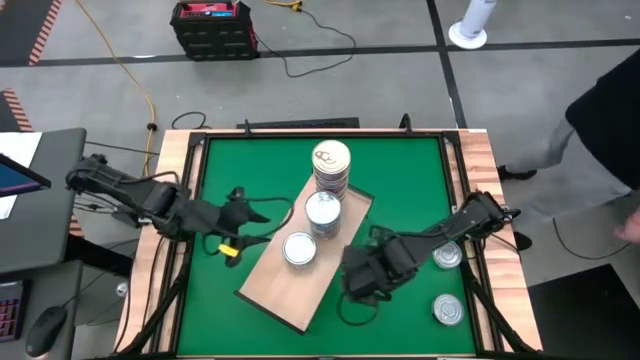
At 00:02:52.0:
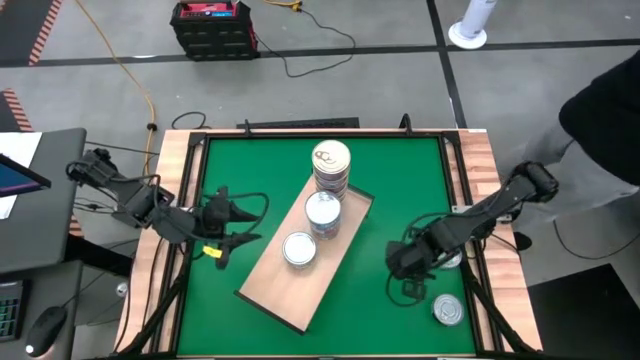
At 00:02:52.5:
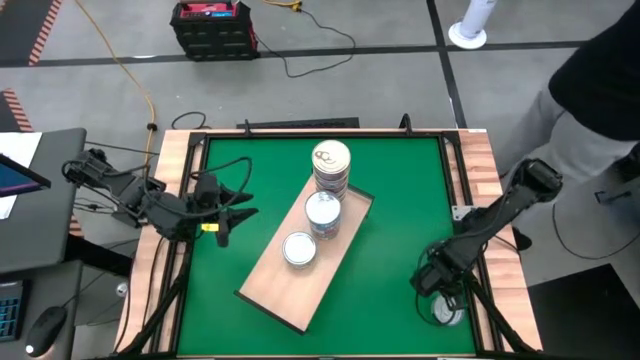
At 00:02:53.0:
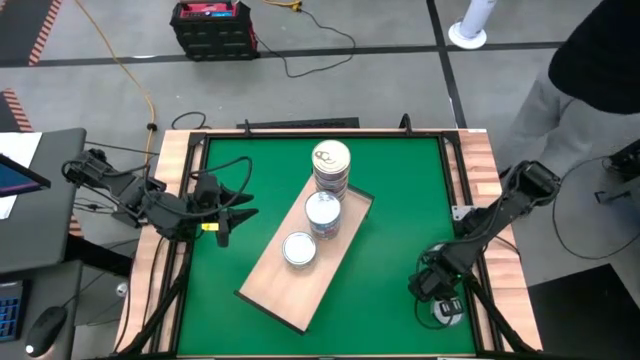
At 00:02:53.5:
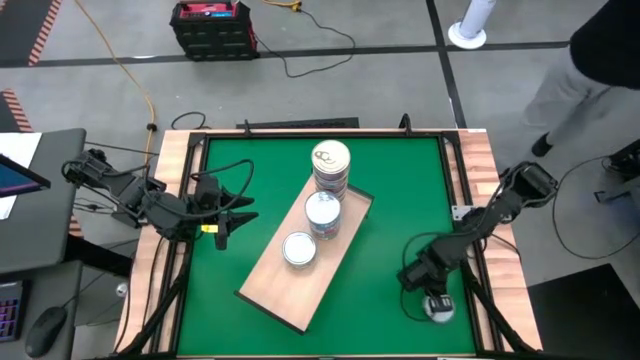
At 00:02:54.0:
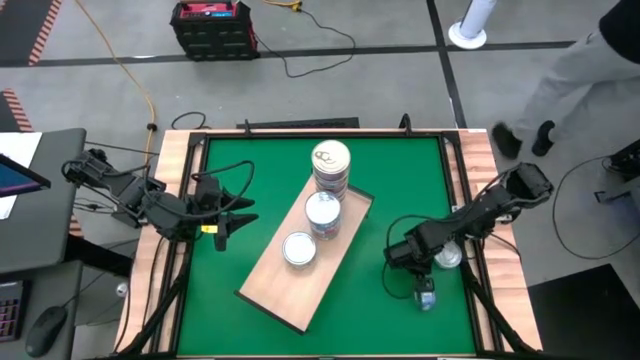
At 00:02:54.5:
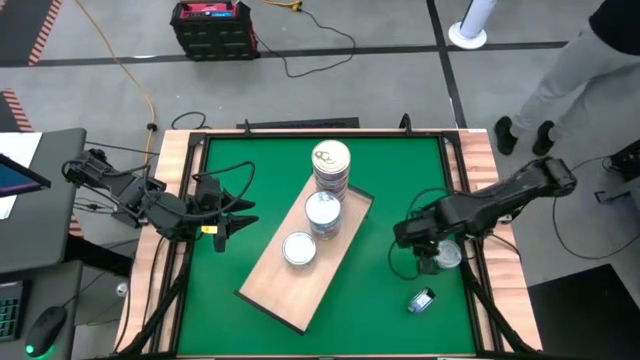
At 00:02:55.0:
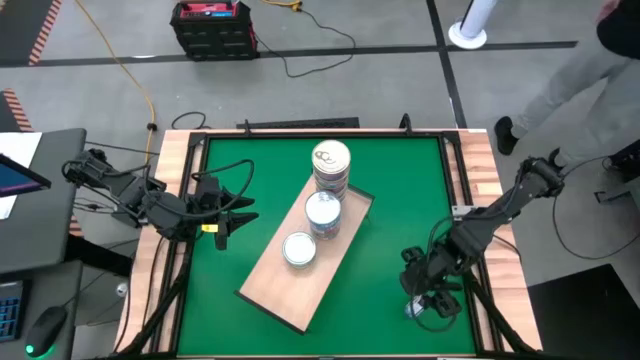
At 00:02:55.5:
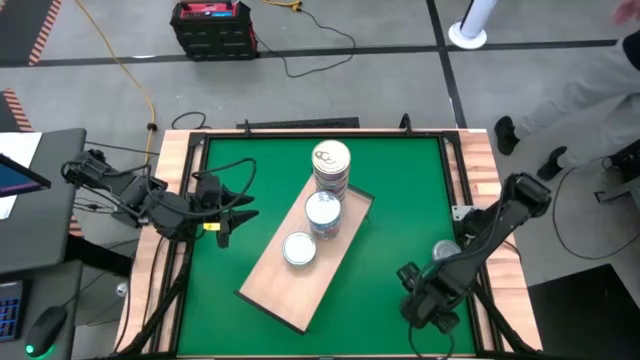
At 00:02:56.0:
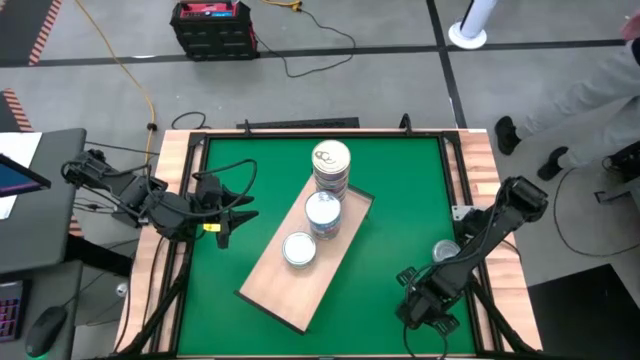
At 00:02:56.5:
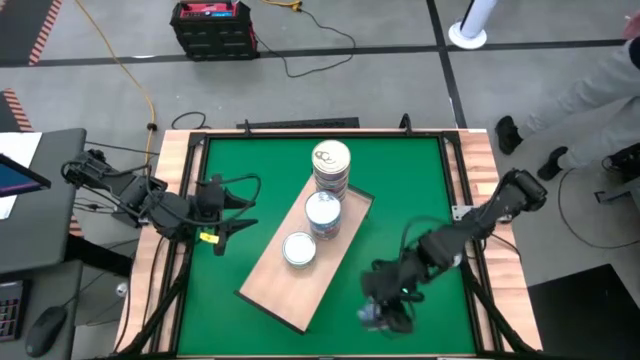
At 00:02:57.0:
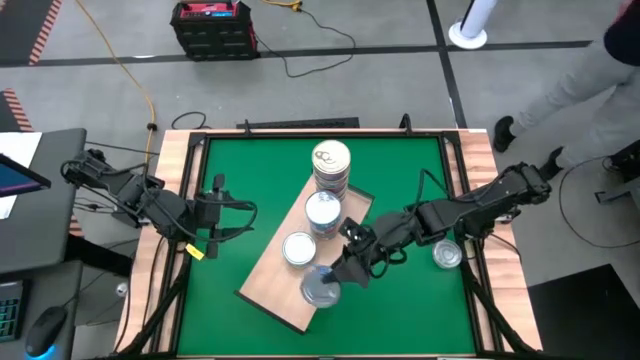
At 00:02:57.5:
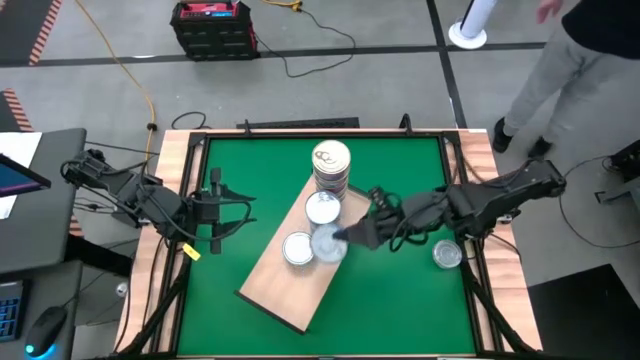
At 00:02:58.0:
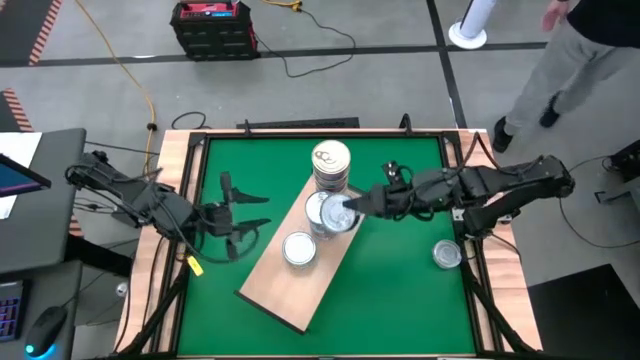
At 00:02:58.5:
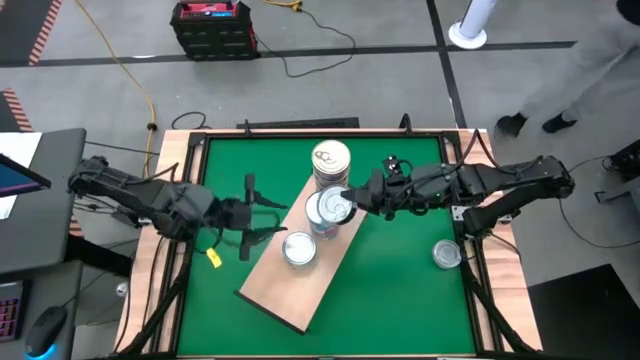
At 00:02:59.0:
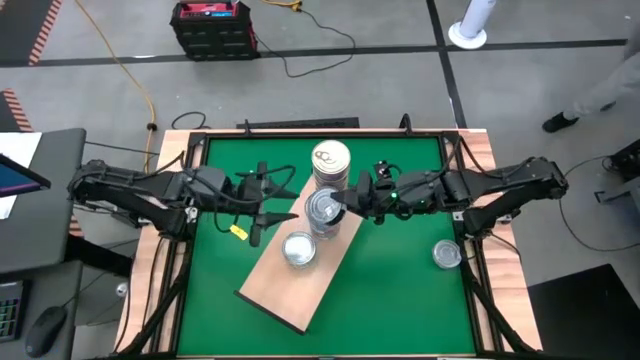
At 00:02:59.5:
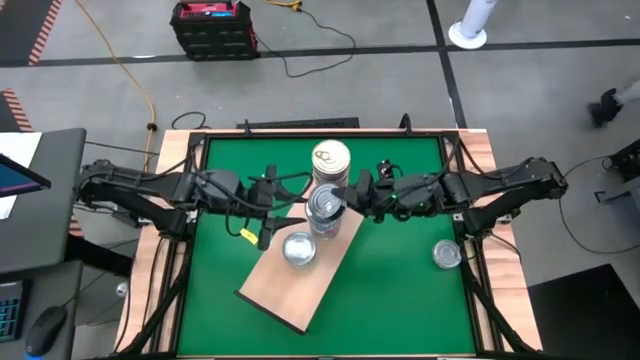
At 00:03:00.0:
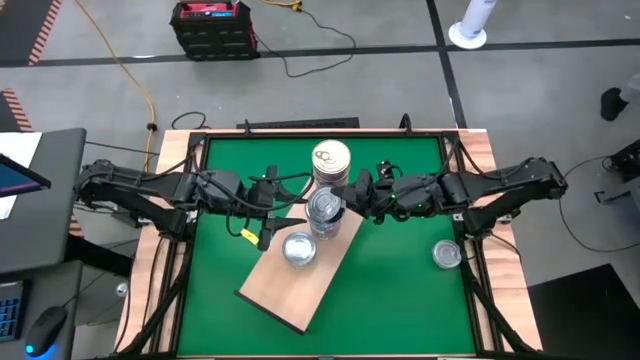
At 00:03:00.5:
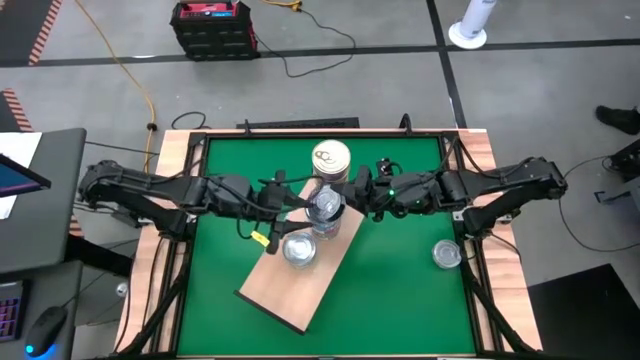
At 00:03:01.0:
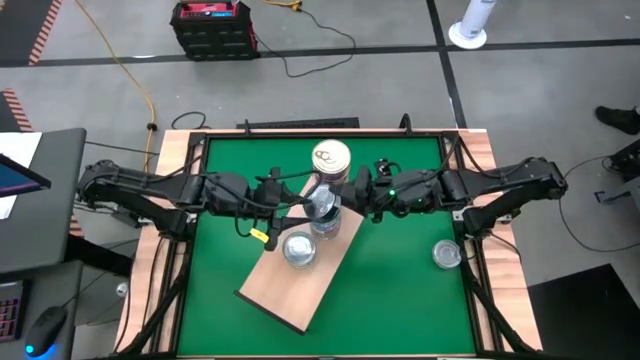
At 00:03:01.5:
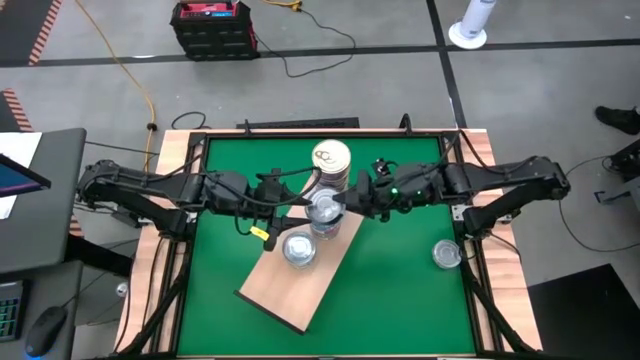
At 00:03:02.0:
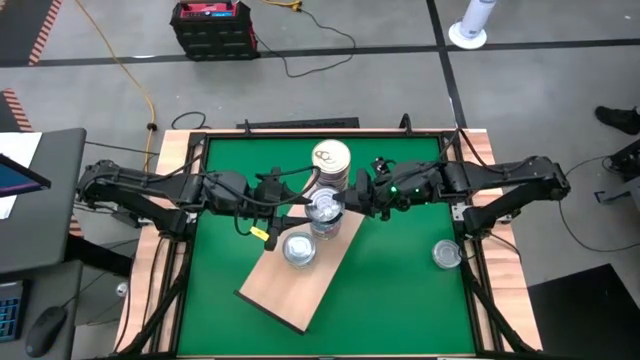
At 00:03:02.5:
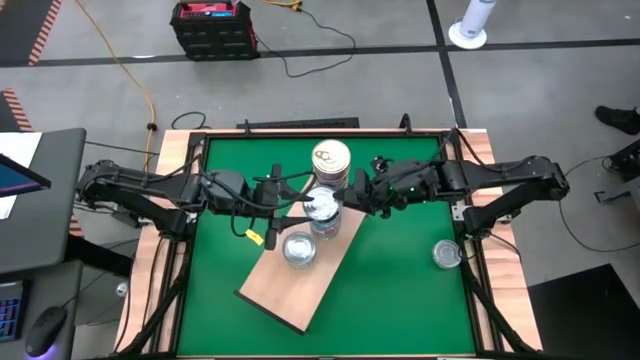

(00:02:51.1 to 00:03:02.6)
Task: Stack canned seafood by type on shelf
Stack the blue tuna can on top of the yellow blue tuna can on the shelf

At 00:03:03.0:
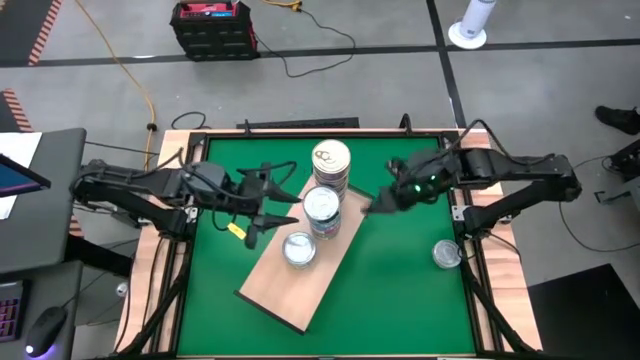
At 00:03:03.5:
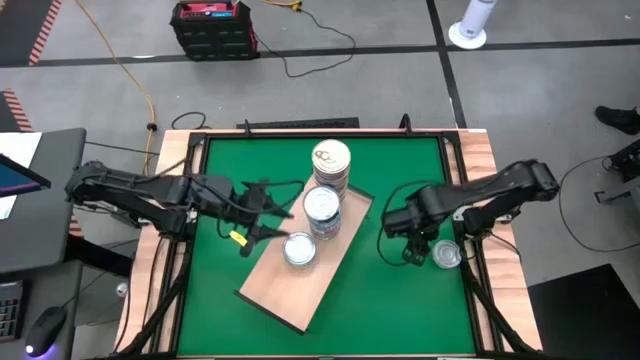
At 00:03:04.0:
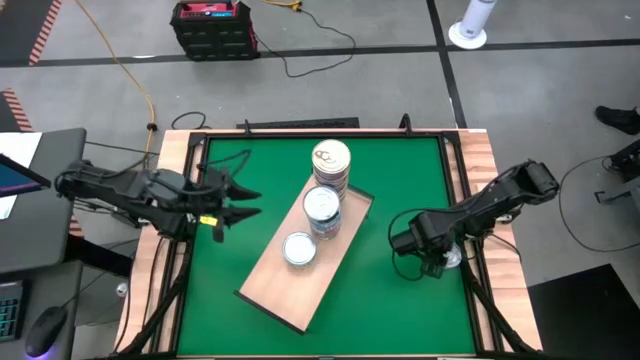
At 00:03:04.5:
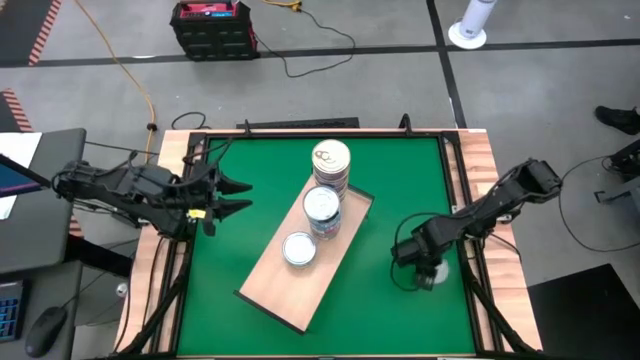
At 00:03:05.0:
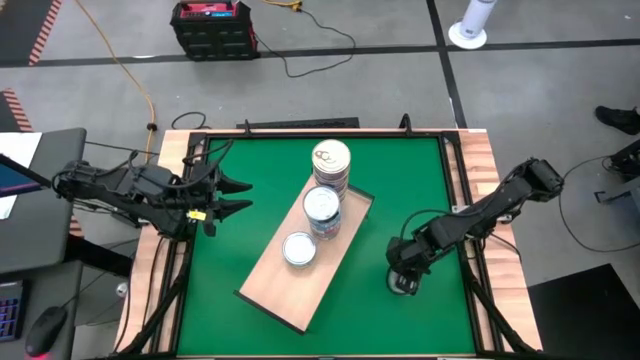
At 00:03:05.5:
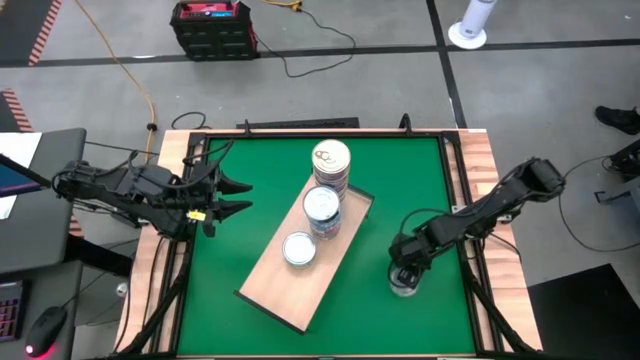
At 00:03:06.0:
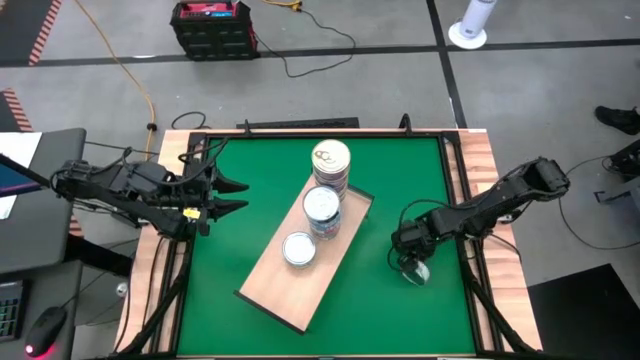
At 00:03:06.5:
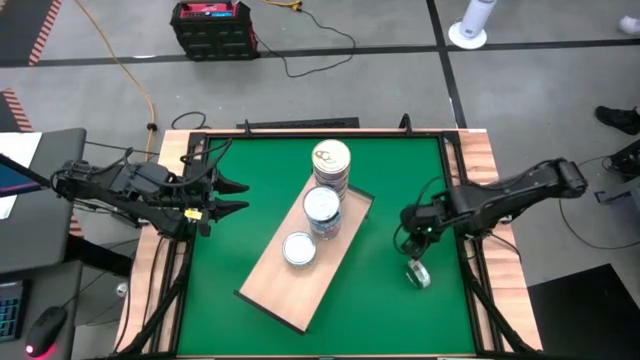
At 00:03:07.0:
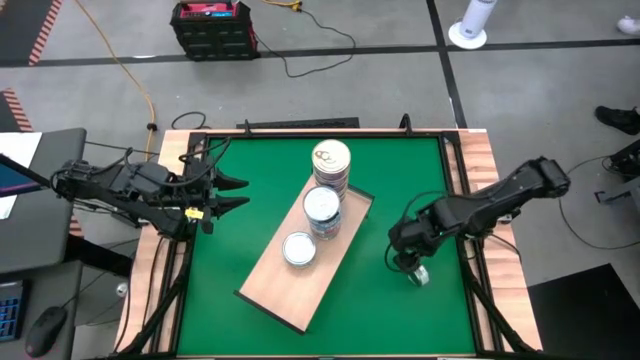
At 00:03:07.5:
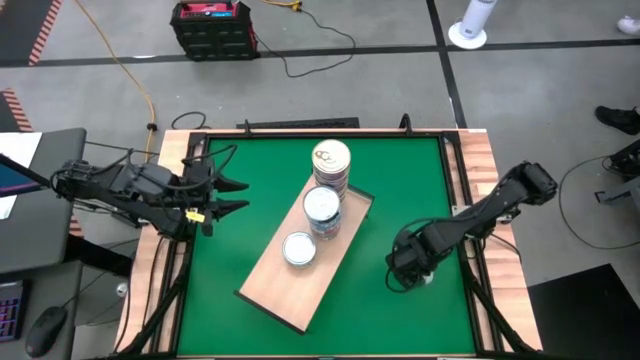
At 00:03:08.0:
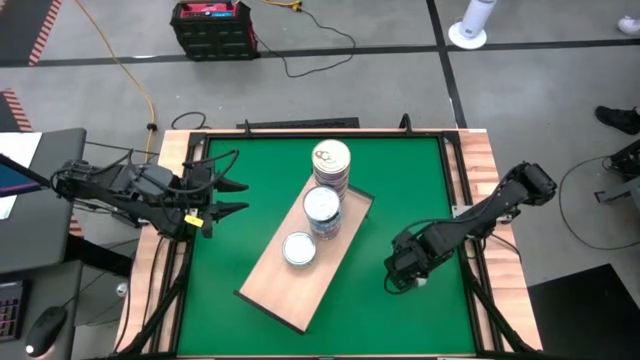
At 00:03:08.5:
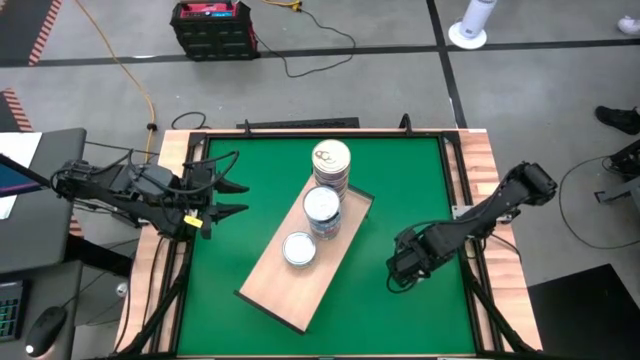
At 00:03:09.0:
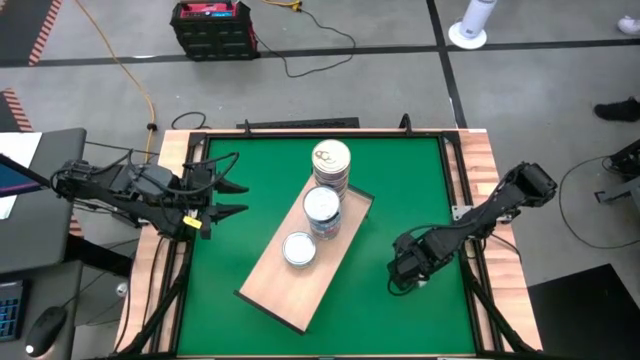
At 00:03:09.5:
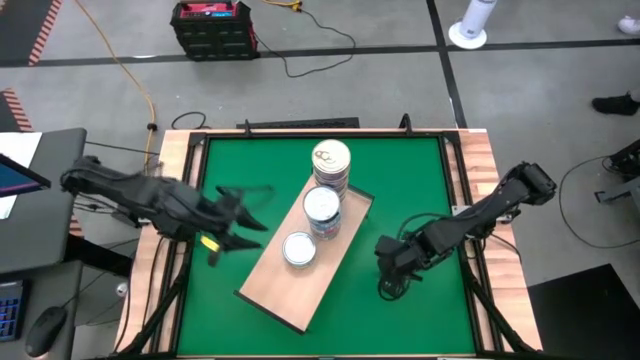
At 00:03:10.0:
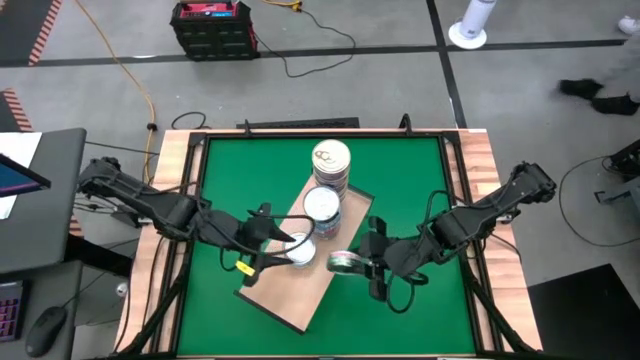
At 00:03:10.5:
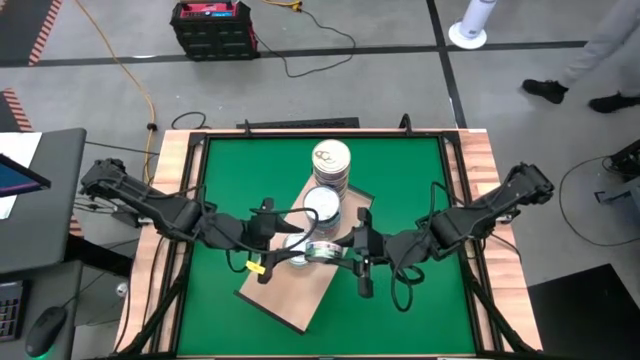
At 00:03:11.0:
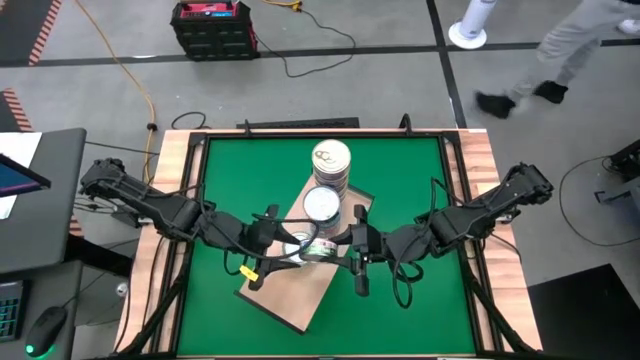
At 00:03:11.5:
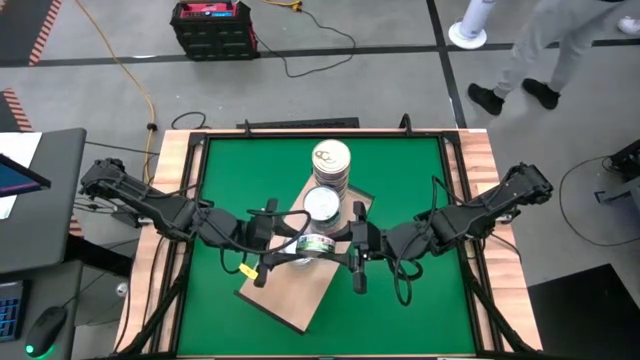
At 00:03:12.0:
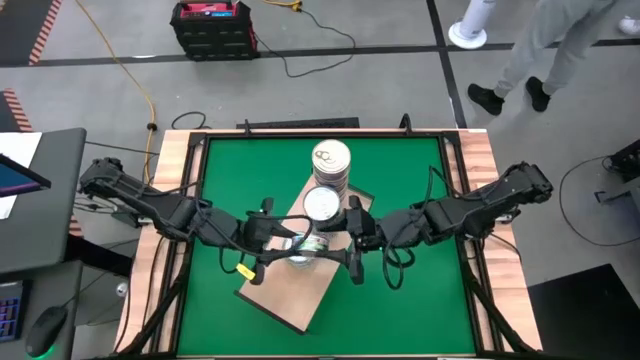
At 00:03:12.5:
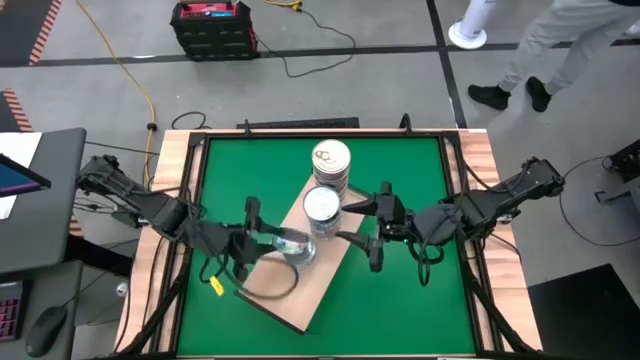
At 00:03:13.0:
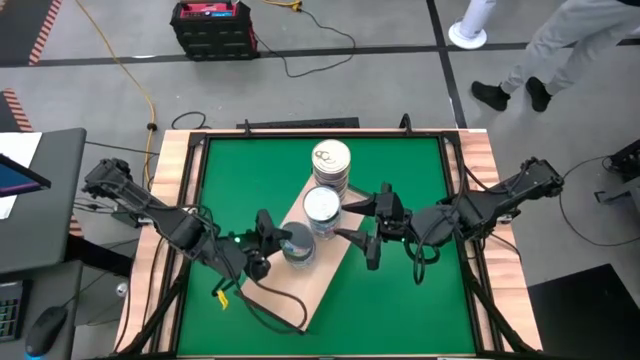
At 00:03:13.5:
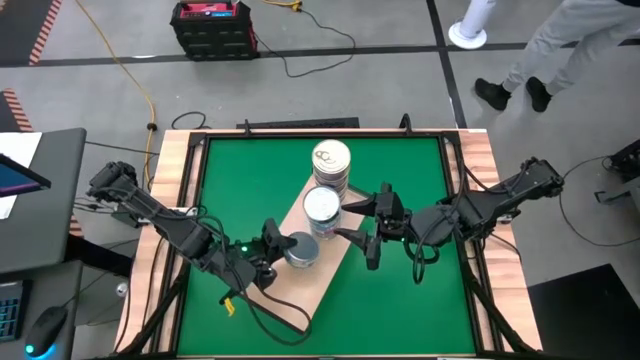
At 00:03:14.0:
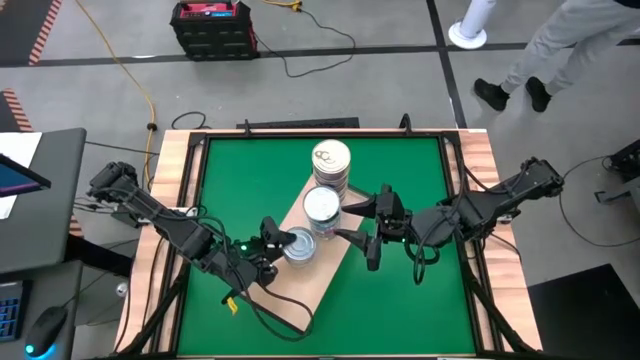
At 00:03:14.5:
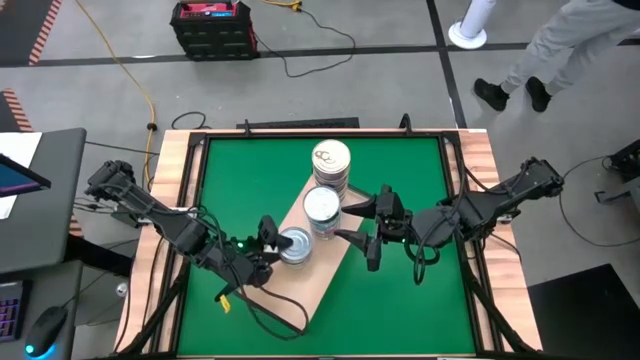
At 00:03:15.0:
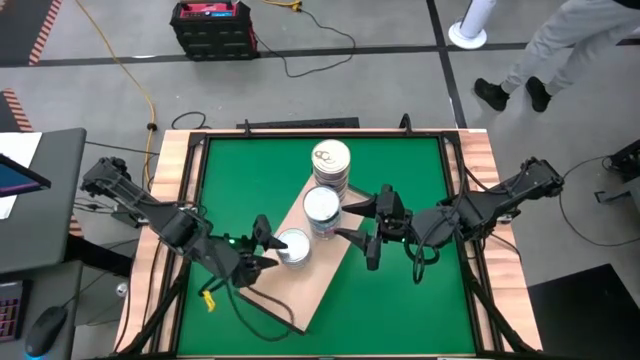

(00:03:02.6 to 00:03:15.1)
Stack the green white tuna can on top of other the green white tuna cans on the shelf
